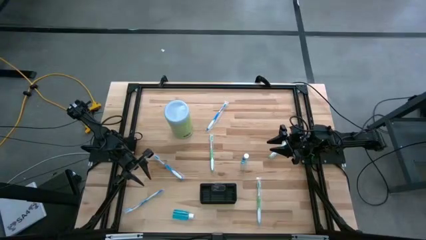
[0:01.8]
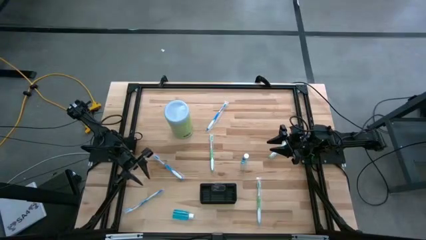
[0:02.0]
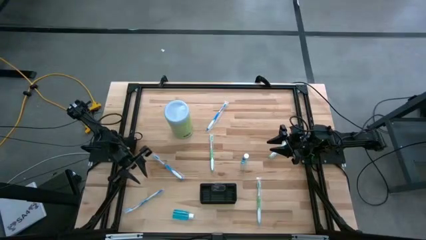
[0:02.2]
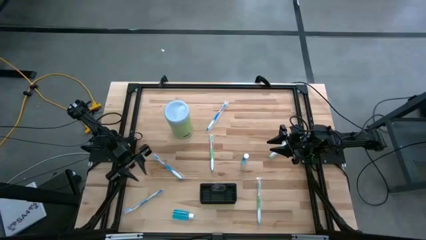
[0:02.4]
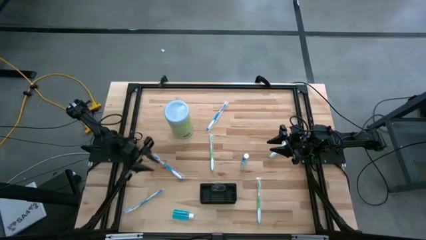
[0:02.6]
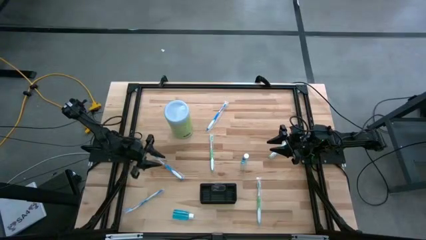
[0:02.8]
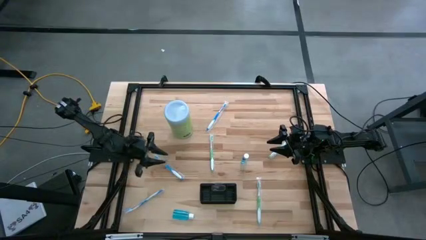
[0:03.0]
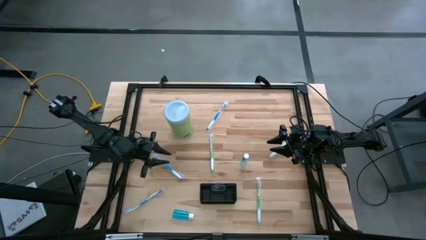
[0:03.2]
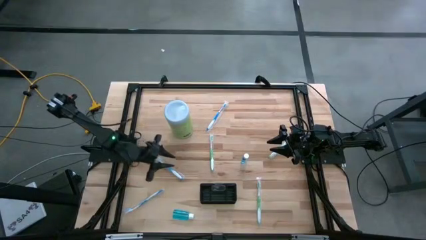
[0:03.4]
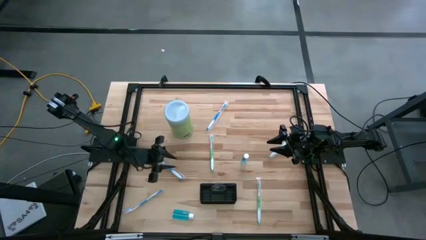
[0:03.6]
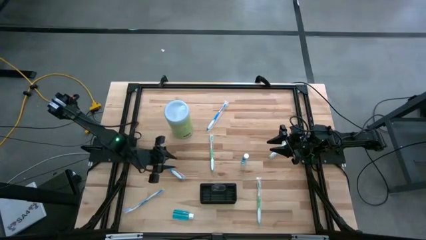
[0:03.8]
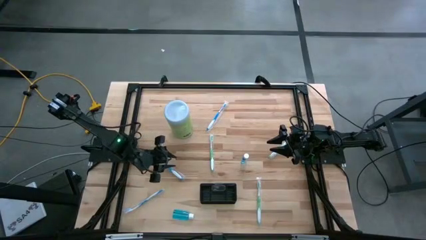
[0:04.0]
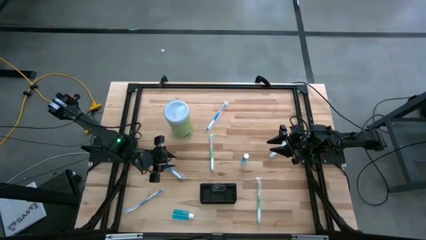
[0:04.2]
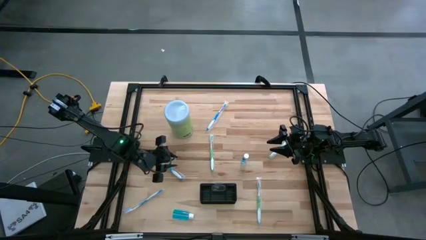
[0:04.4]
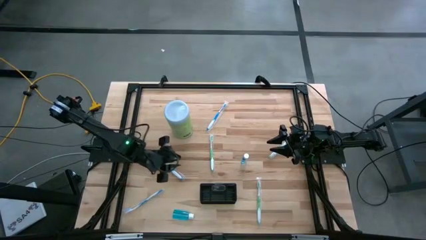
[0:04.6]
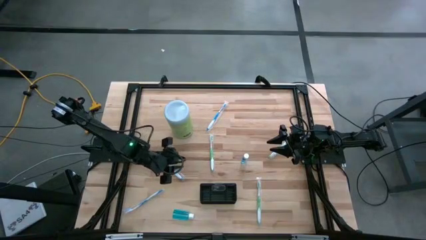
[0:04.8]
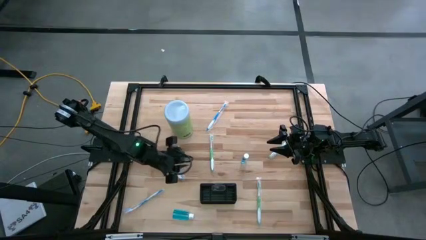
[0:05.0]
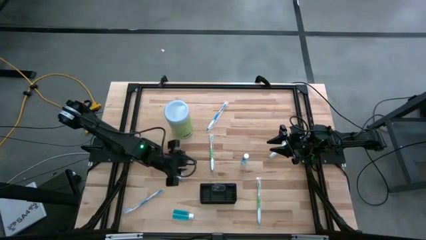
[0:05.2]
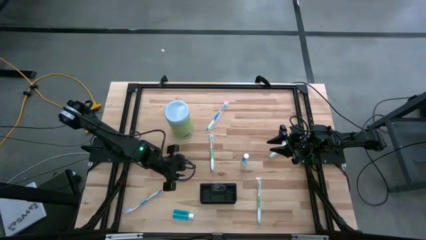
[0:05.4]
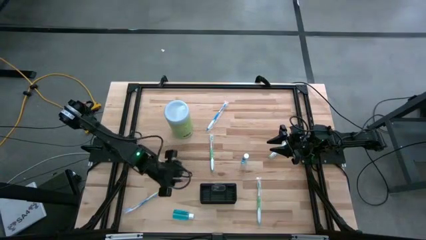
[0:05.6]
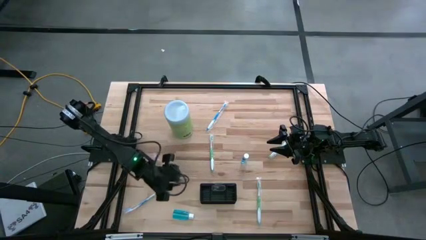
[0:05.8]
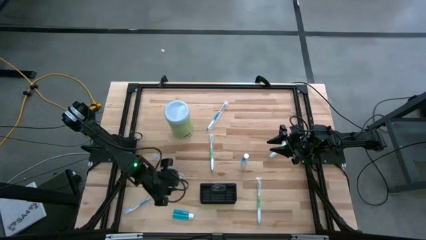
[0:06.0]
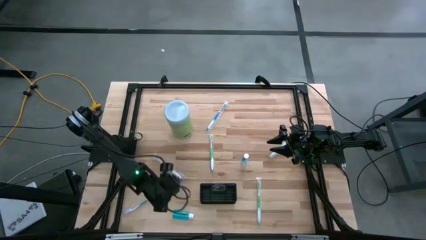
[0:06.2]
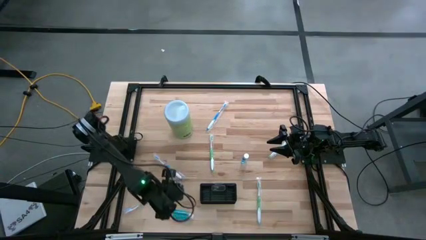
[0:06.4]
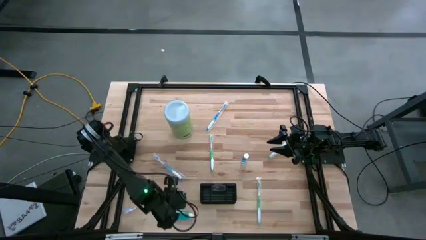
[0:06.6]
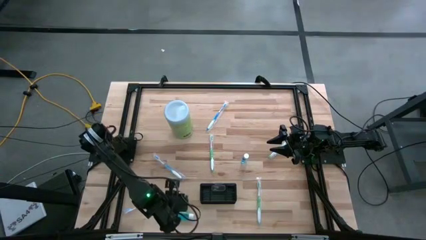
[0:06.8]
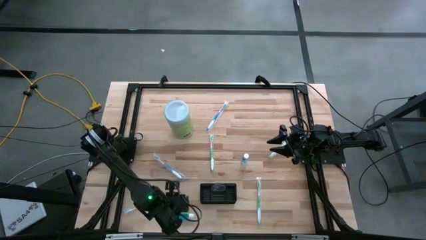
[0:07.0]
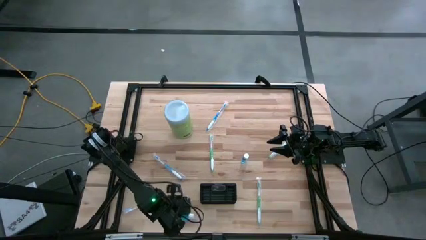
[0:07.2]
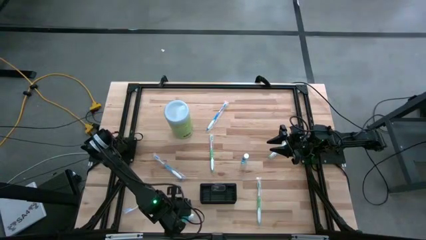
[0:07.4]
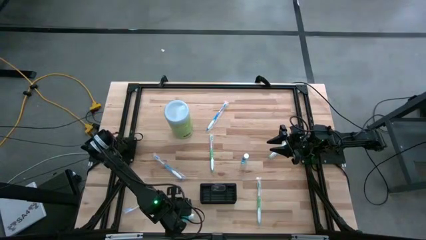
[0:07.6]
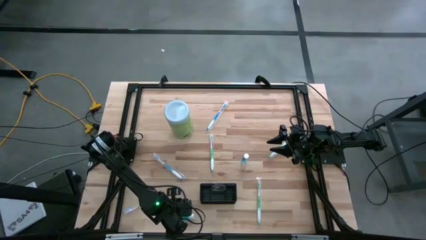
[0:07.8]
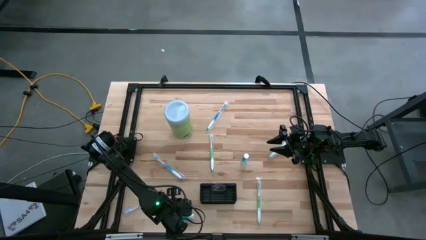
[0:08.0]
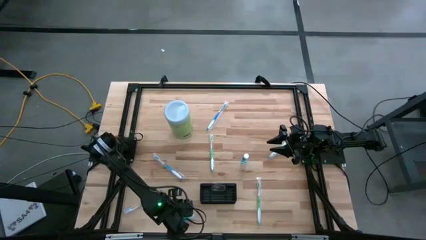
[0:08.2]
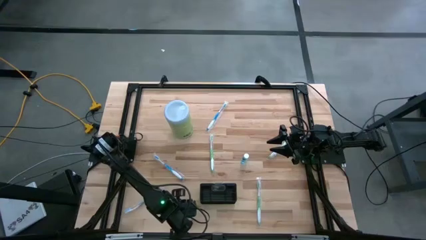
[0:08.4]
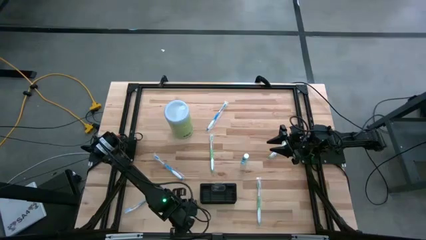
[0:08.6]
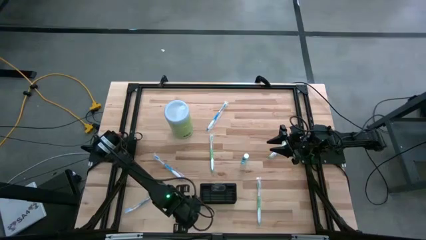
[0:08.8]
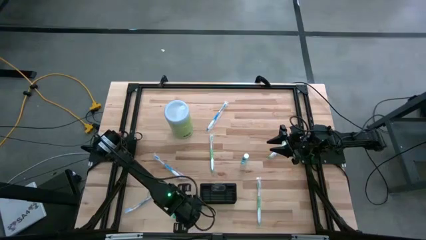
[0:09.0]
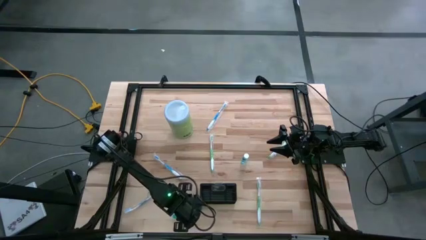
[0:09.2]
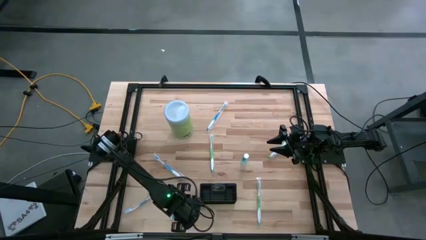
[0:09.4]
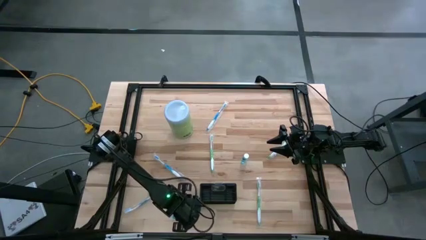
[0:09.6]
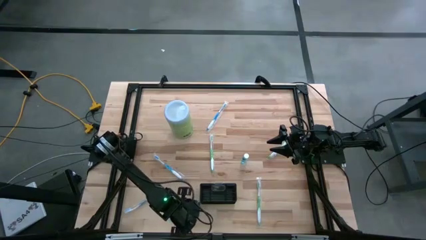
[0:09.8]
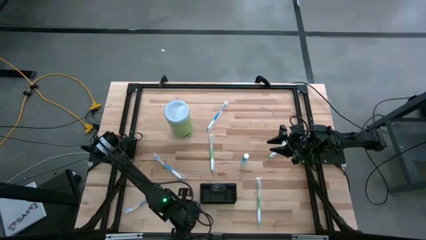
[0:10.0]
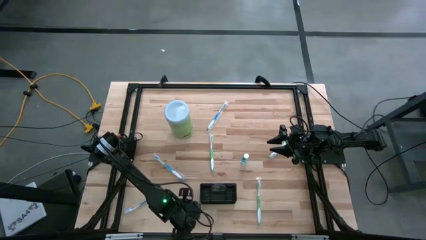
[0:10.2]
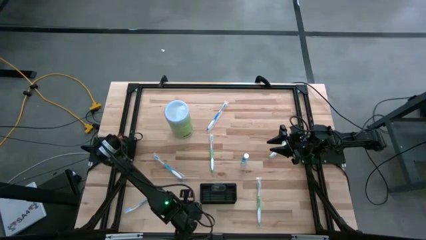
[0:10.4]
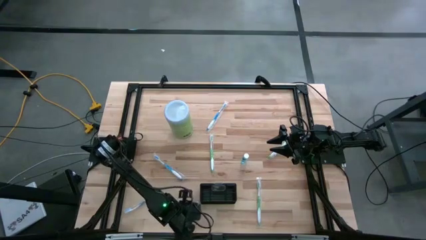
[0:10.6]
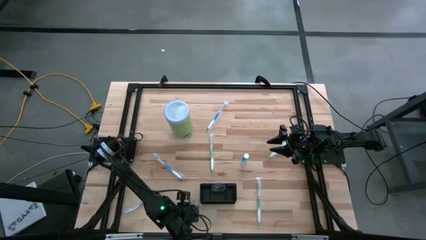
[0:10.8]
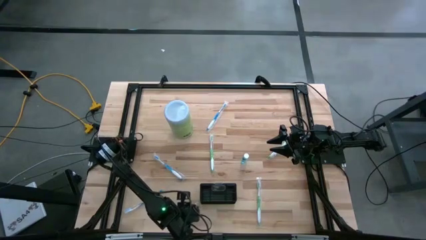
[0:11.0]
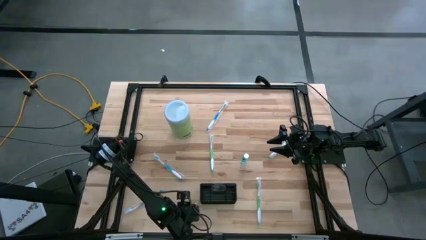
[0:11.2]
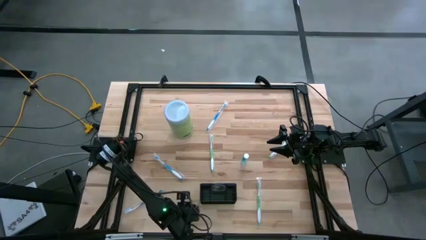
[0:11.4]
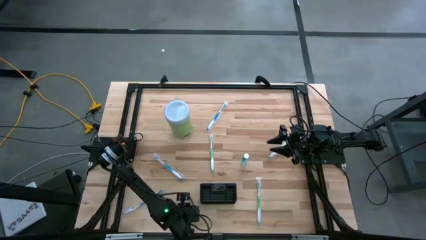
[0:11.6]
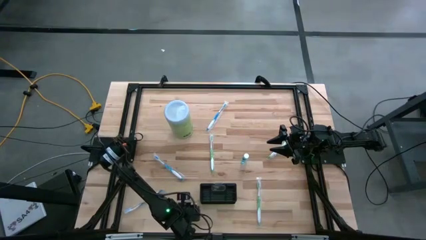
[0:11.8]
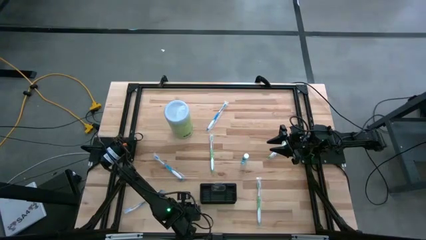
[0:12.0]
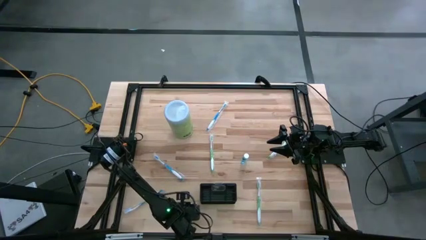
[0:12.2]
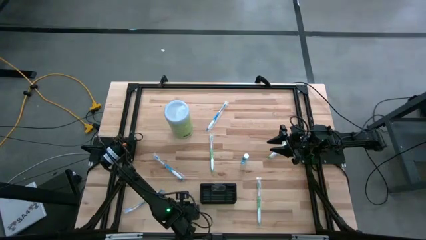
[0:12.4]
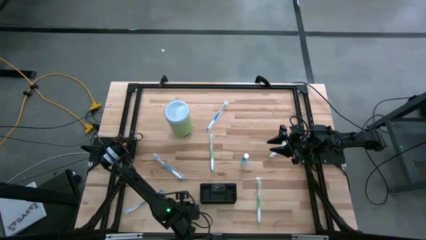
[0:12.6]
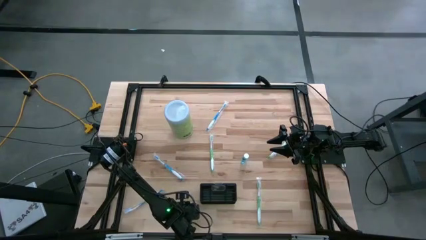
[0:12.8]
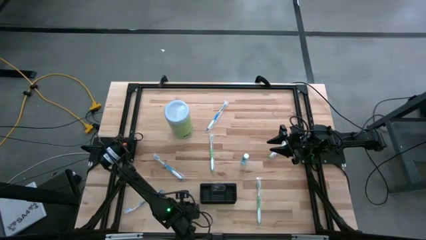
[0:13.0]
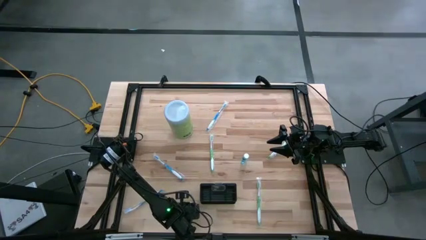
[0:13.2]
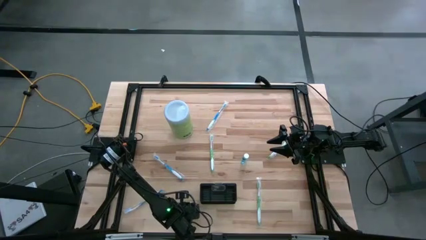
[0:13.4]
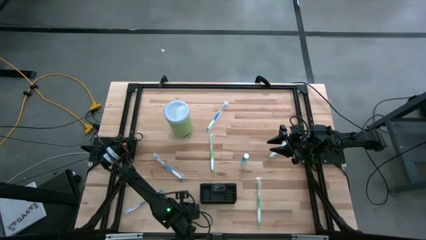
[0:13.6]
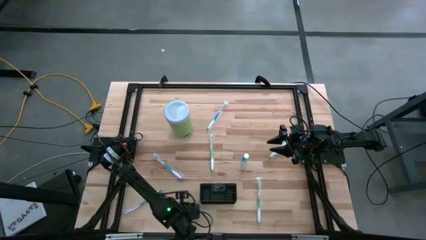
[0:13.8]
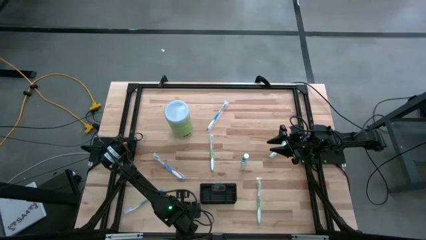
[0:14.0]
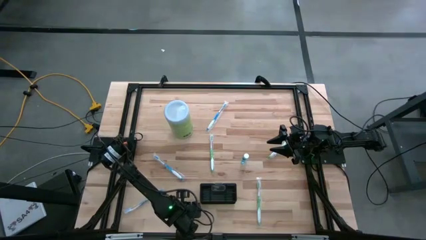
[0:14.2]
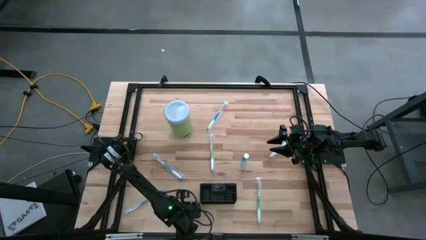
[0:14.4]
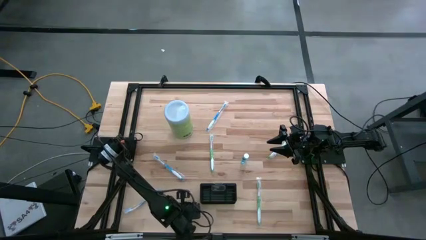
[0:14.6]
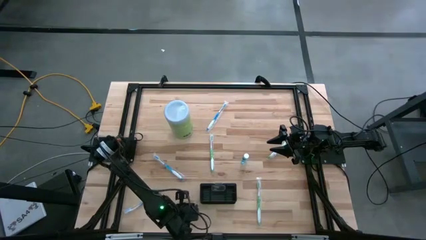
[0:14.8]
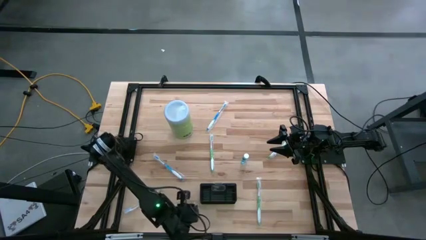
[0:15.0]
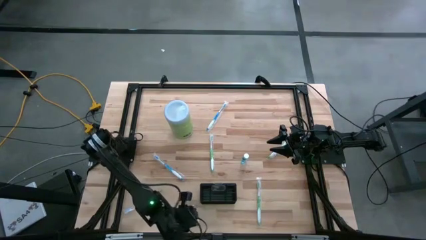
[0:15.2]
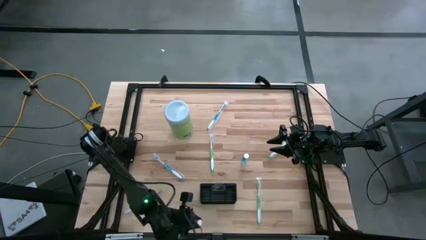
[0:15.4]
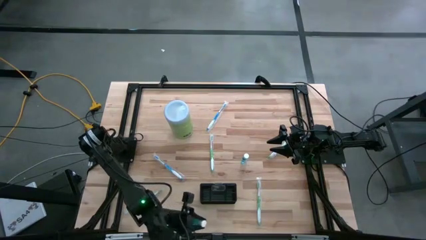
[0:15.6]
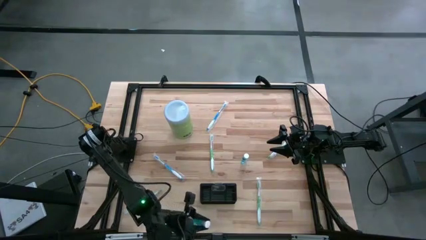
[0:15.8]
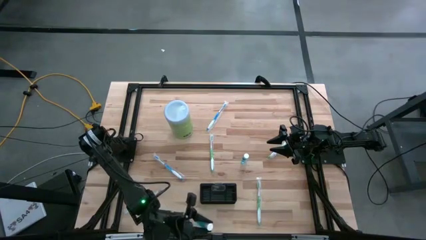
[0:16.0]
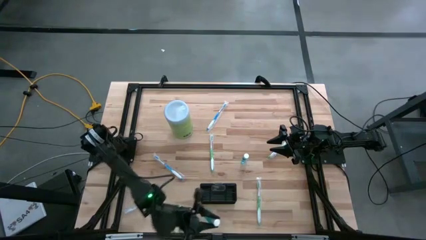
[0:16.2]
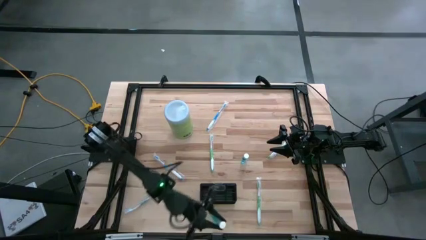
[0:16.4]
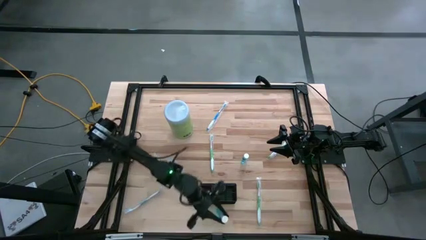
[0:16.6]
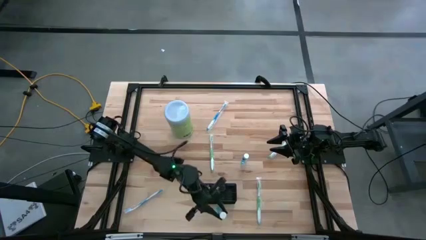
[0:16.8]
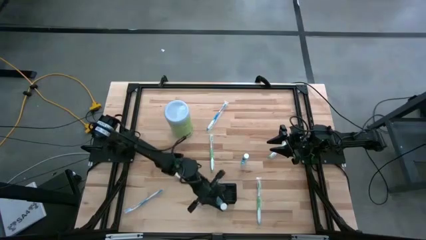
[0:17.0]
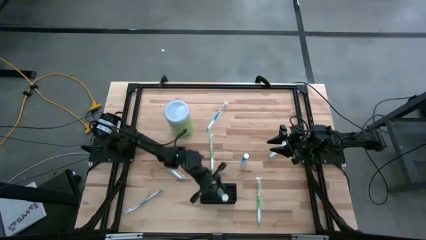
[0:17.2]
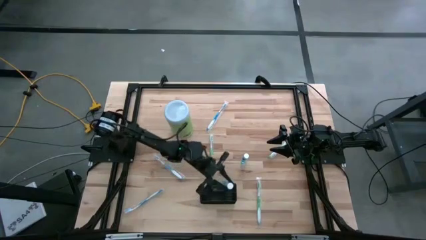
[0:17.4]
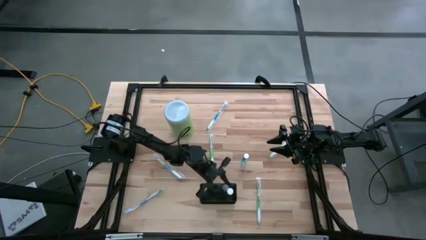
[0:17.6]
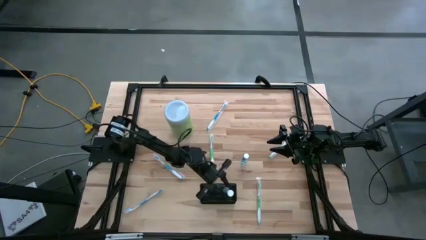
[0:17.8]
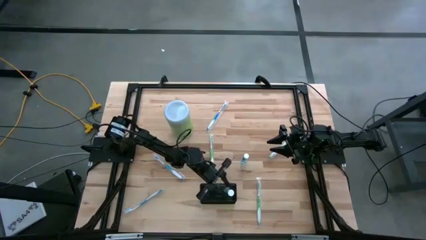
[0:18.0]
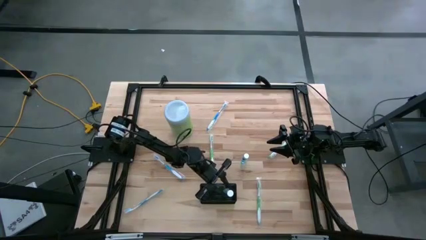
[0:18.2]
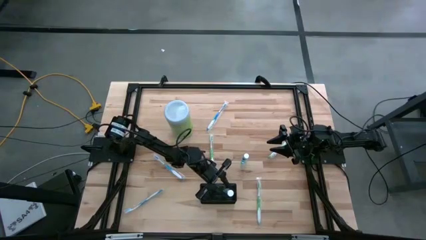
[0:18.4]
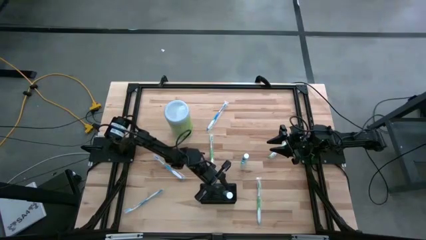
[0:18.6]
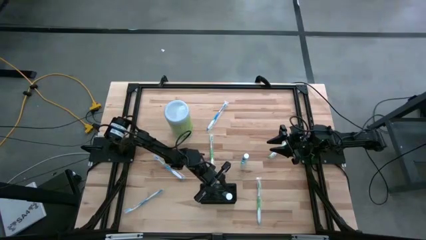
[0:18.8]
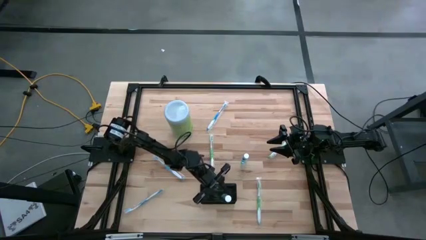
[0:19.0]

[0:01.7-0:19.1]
Task: Pick & Place toothbrushing station
Put the bottom mouthwash into the mesh organizer
